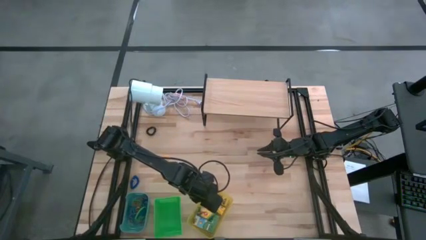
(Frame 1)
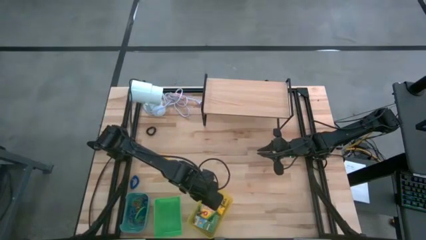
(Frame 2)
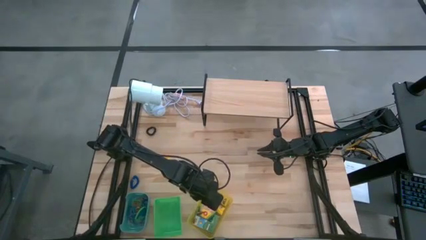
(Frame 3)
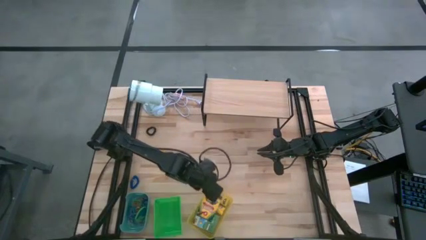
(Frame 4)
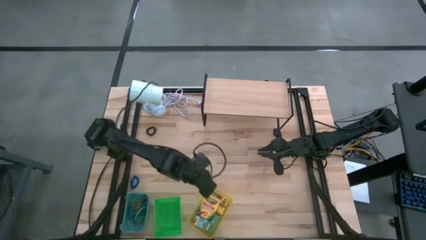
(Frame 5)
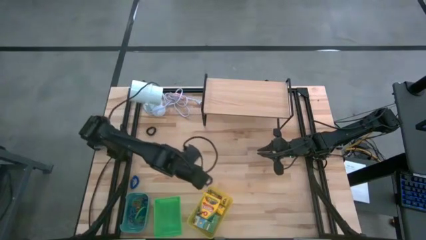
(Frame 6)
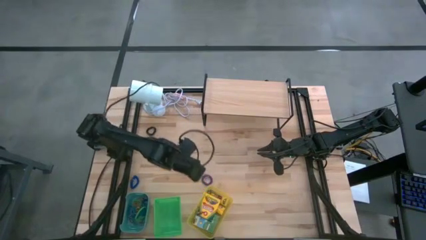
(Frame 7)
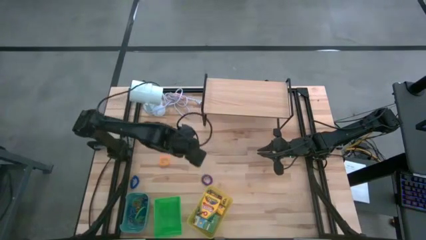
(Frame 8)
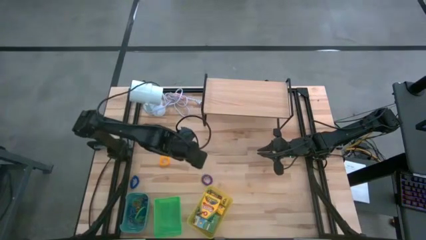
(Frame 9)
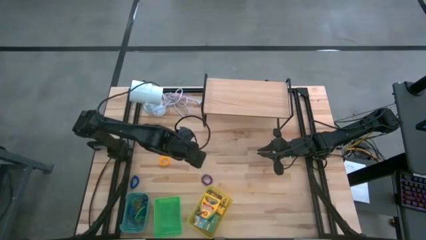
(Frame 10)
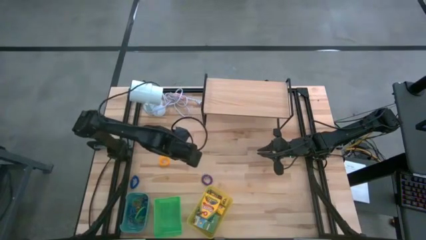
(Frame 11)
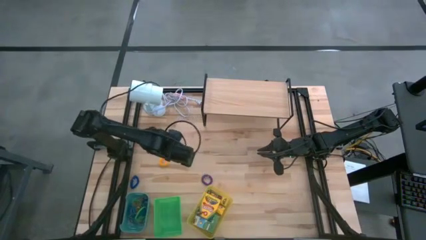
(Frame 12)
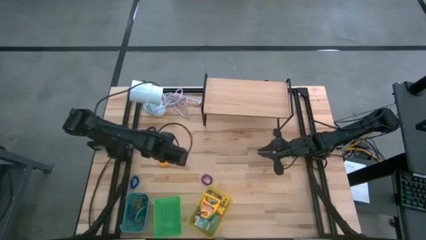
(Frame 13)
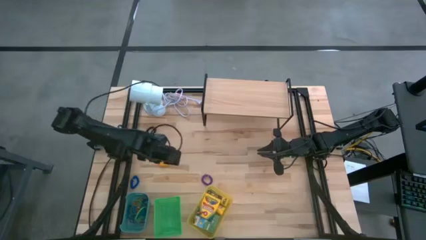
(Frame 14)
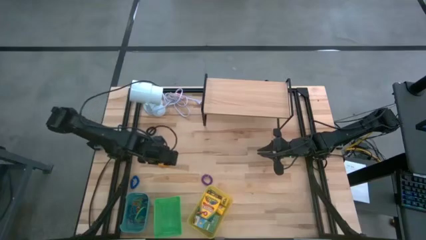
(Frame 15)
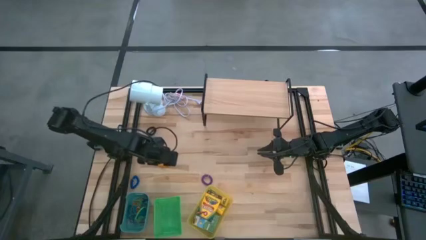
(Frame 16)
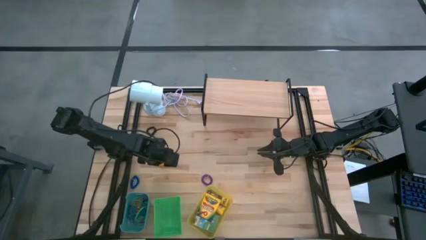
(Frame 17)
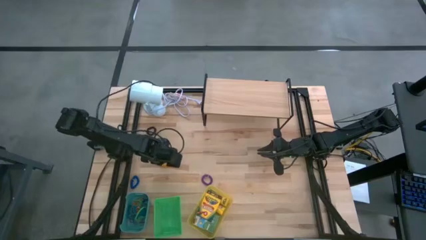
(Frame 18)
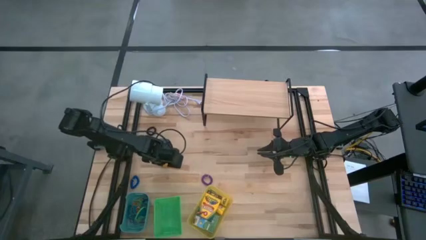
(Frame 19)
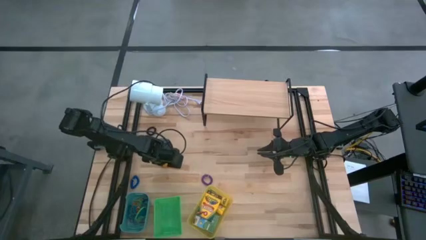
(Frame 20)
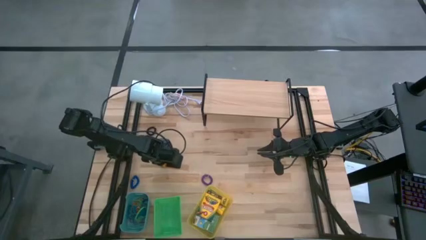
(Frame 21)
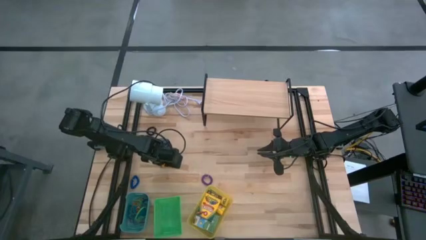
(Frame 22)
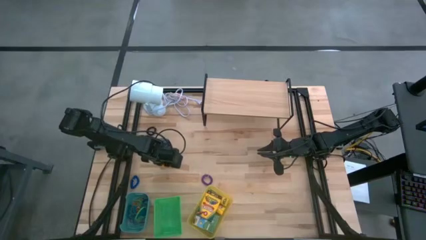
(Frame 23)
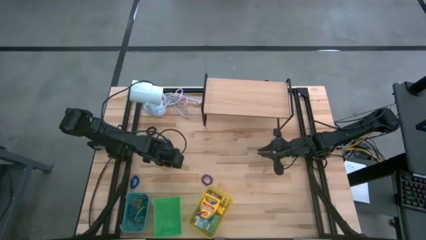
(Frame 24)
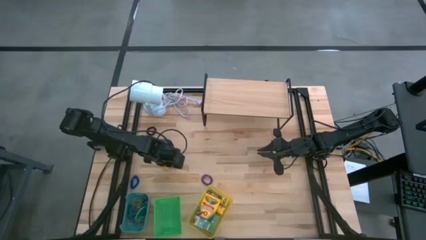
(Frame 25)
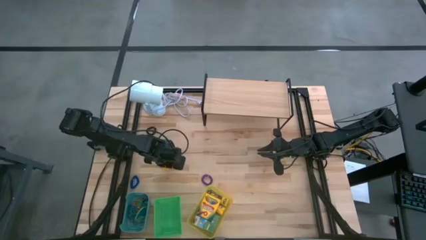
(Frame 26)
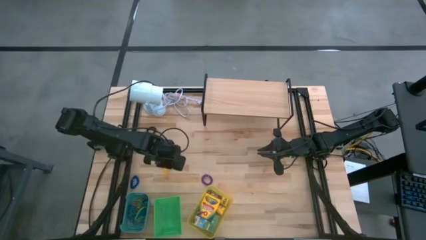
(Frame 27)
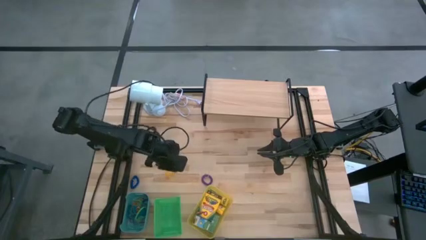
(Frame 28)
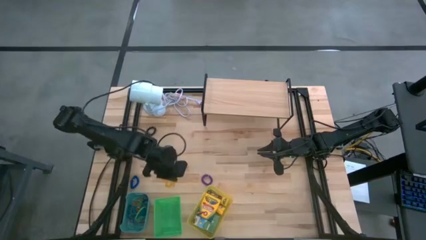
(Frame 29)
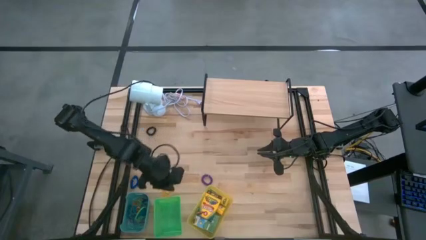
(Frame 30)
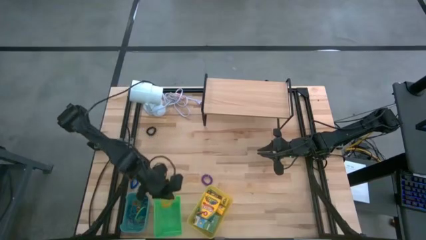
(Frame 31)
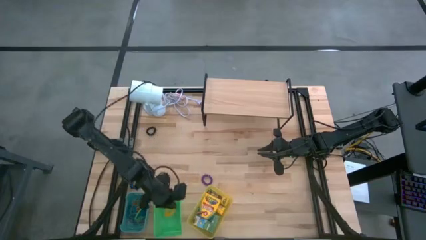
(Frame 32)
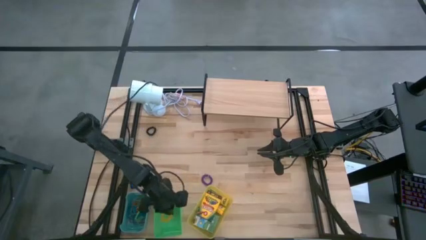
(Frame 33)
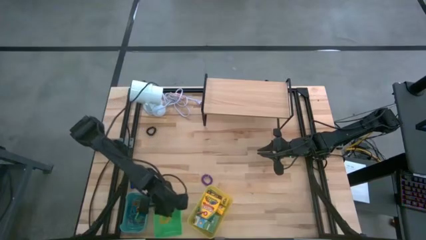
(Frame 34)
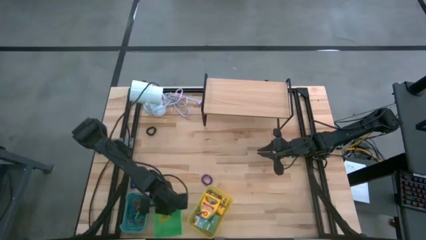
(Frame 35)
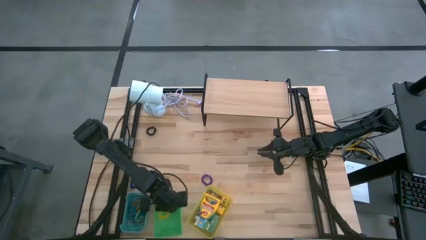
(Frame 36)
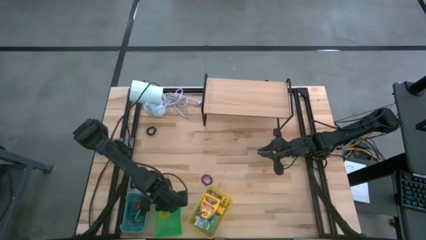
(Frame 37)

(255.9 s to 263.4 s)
Task: Pick & Place Office Desk Supplies
Put the yellow spring rubberband into the green bin

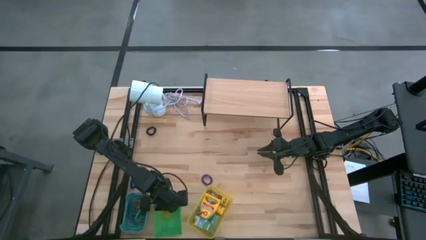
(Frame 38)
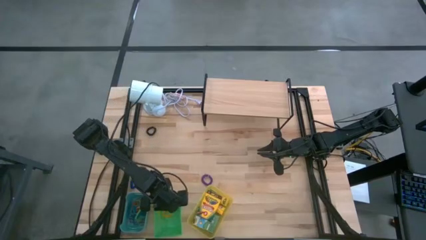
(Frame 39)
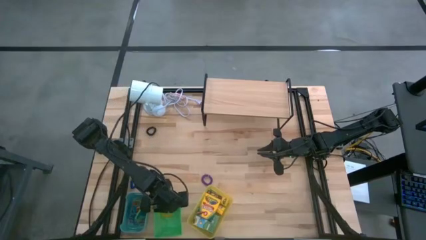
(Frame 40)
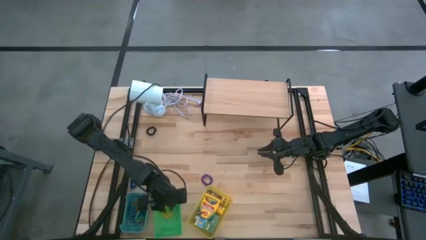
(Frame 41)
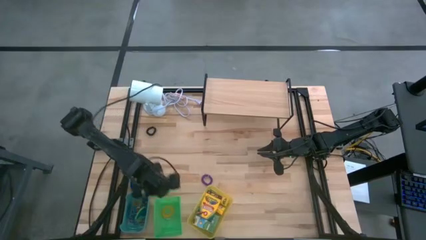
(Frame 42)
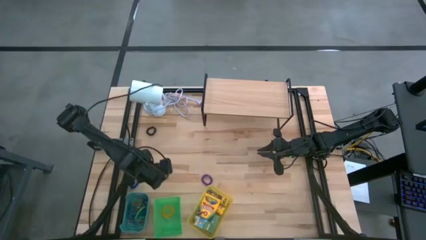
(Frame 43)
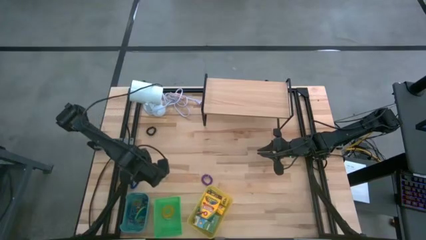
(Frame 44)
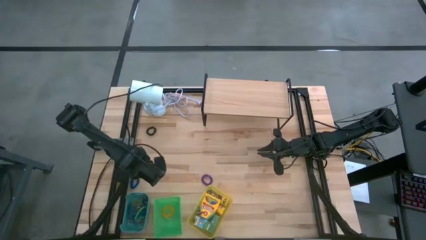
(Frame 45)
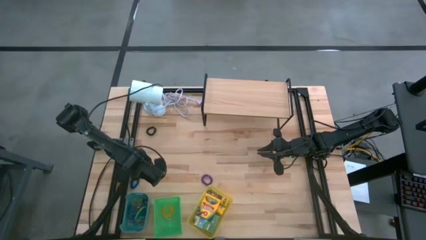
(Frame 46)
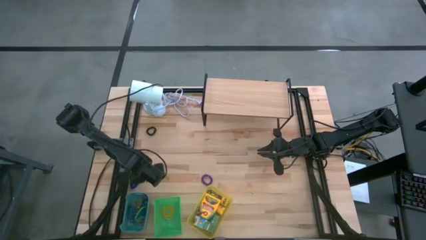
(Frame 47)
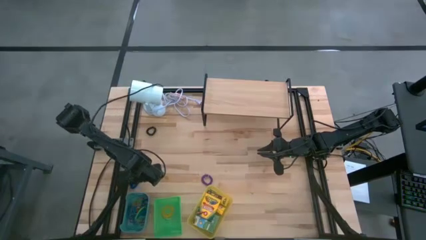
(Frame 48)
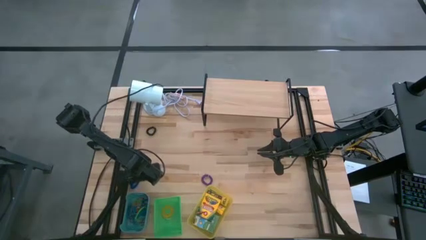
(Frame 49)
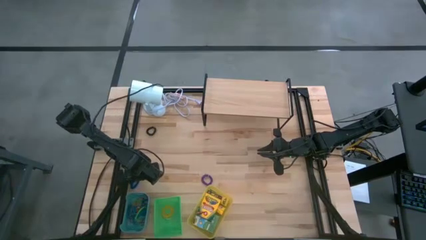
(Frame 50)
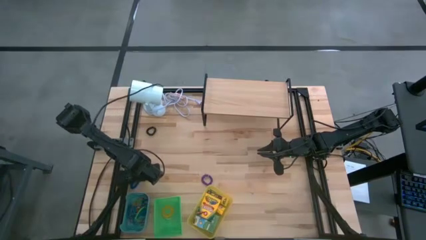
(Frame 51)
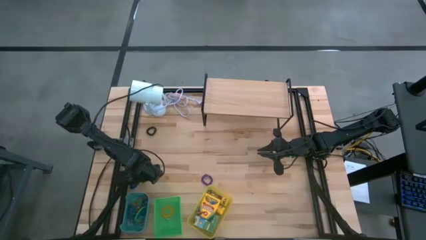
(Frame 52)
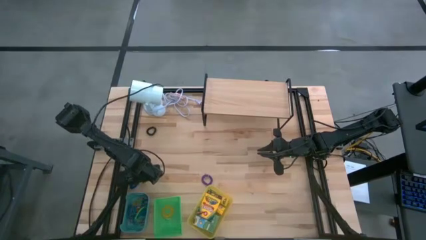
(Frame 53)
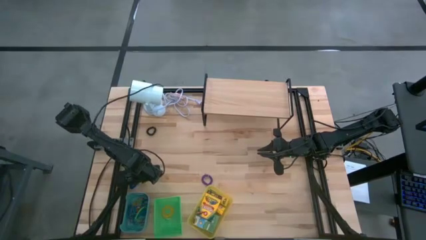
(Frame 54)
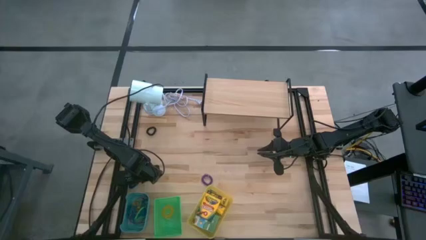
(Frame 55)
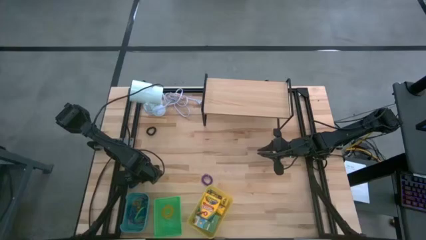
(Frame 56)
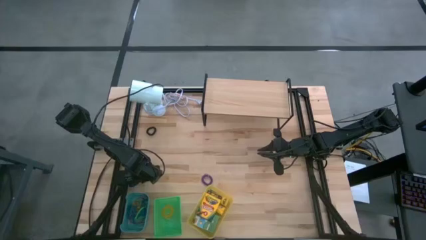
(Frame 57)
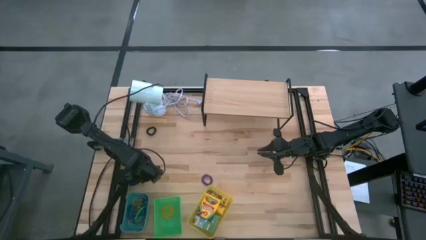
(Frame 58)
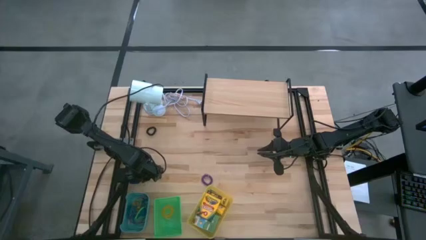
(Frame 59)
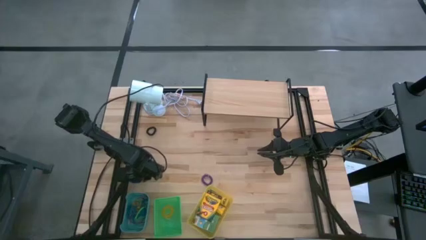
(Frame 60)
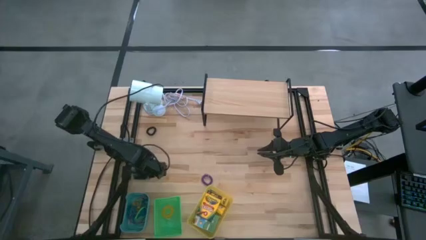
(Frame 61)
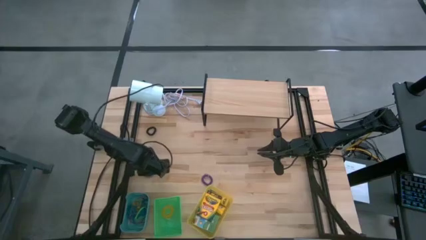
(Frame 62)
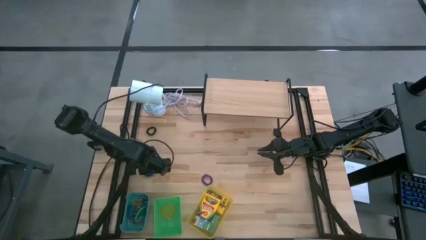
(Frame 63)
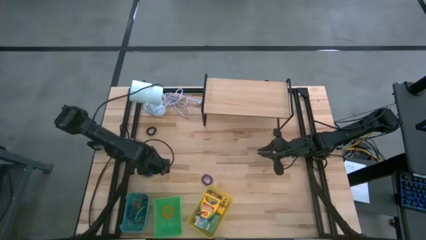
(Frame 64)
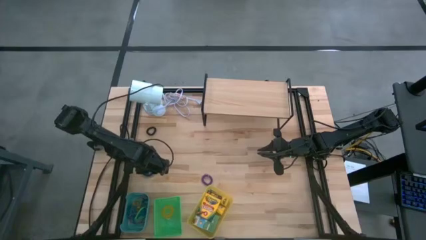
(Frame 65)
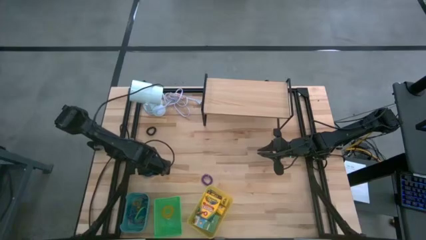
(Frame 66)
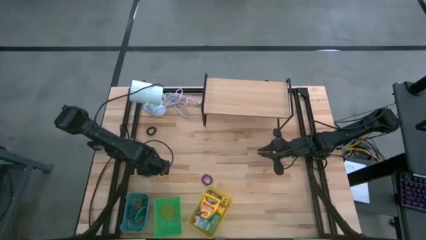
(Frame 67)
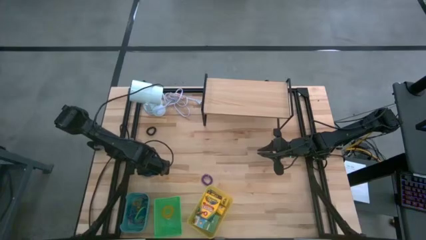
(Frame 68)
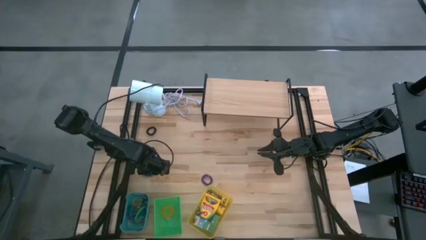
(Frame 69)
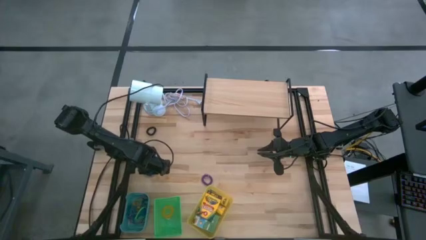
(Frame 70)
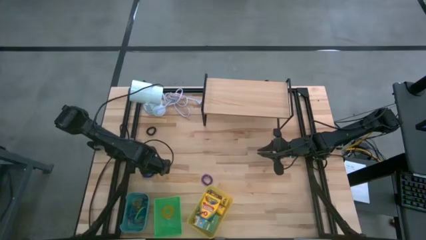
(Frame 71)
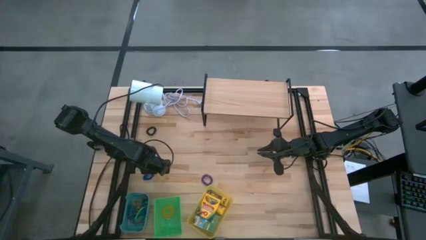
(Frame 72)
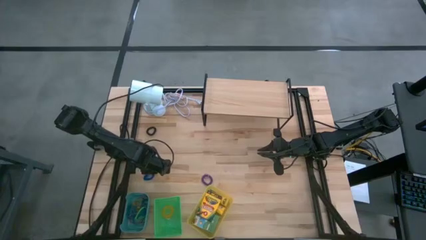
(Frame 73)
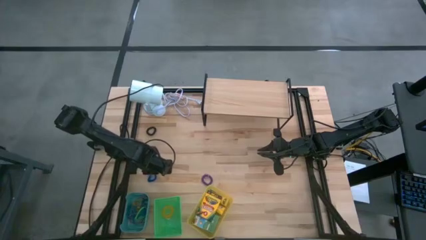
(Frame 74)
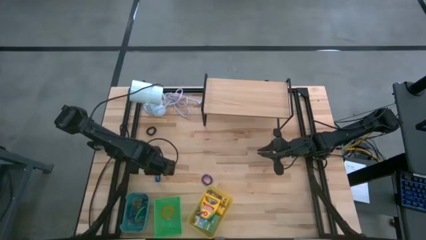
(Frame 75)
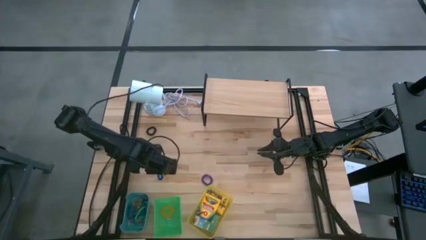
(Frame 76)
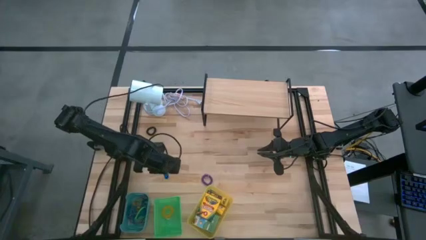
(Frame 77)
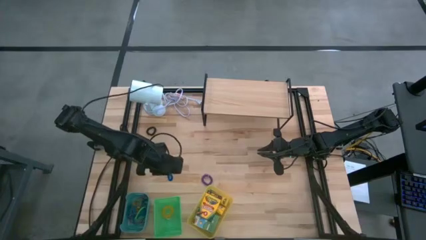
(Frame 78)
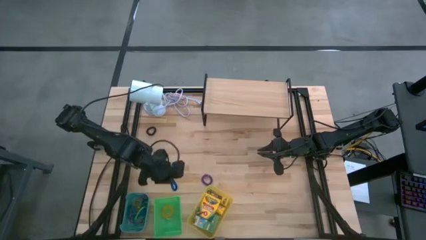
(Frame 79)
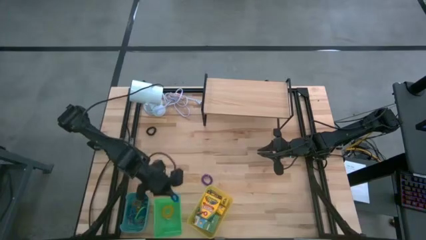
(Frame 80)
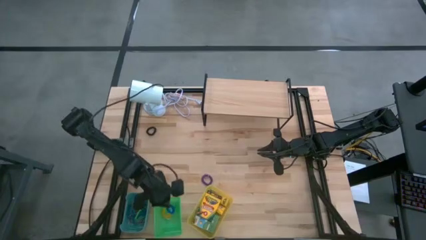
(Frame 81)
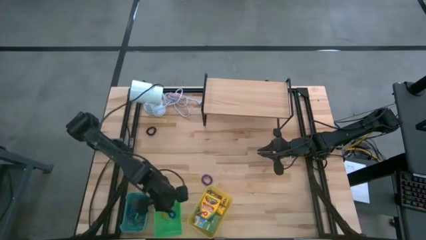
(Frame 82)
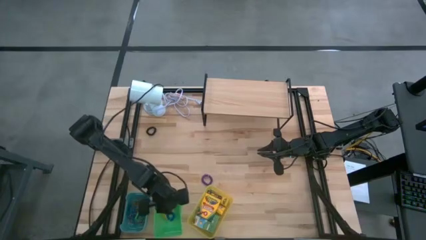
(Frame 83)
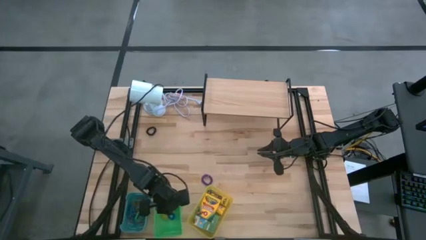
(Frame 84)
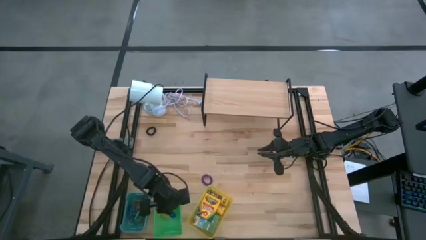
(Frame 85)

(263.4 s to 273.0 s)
Put the blue spring rubberband into the green bin
